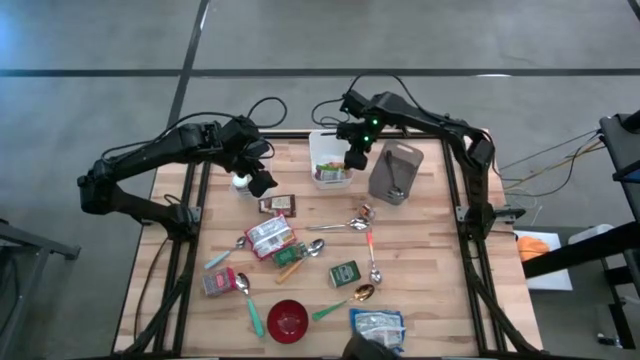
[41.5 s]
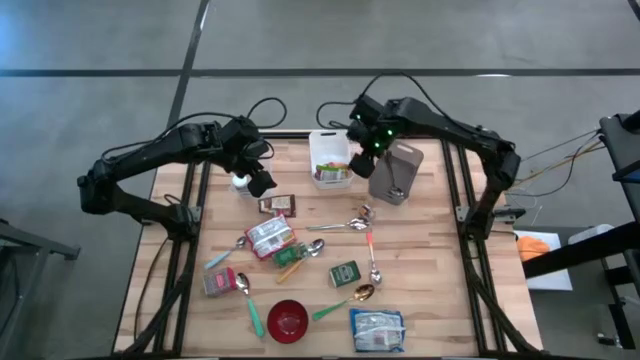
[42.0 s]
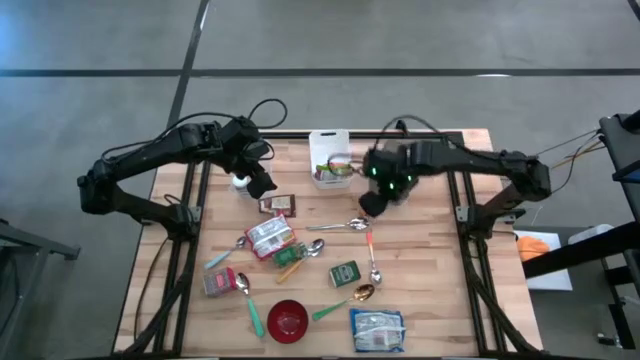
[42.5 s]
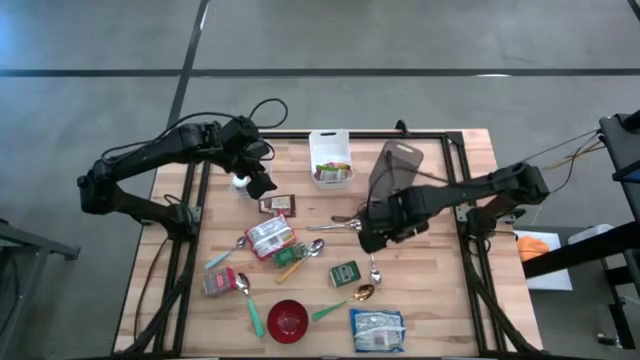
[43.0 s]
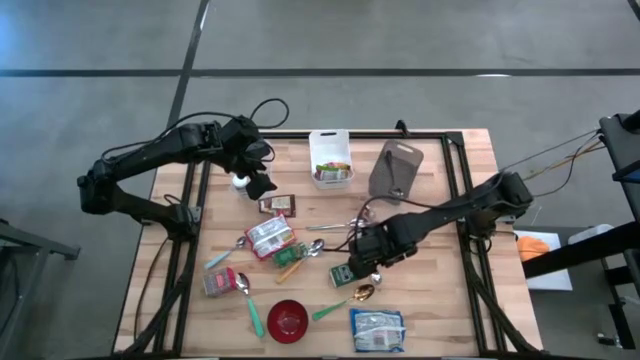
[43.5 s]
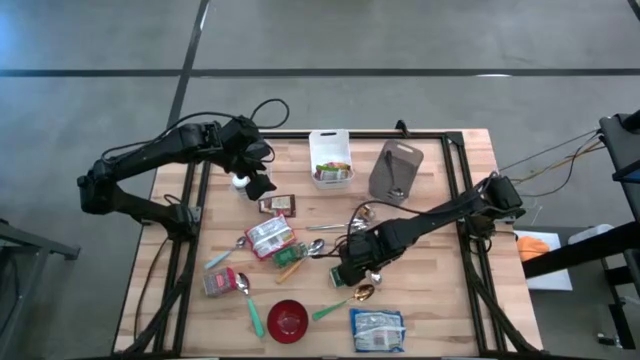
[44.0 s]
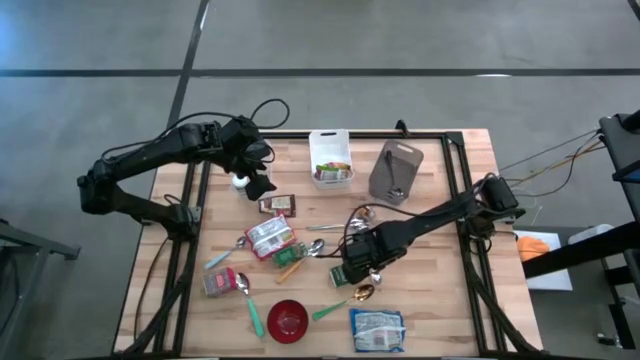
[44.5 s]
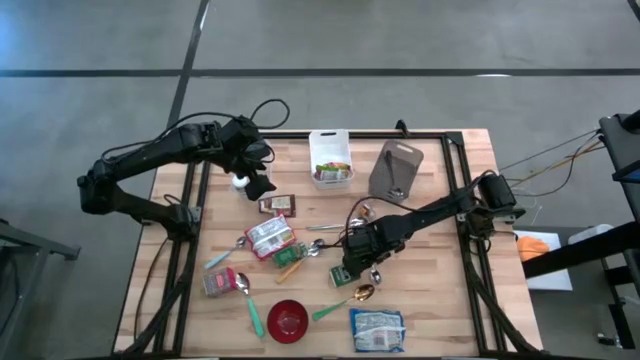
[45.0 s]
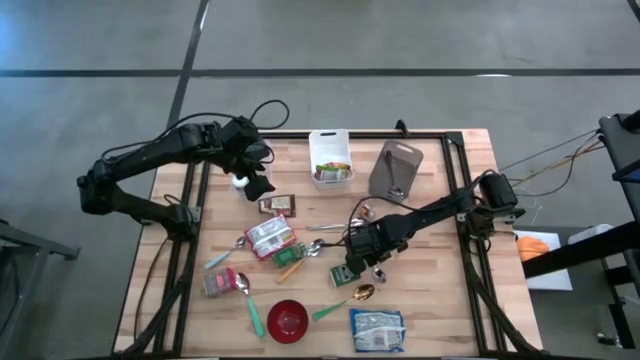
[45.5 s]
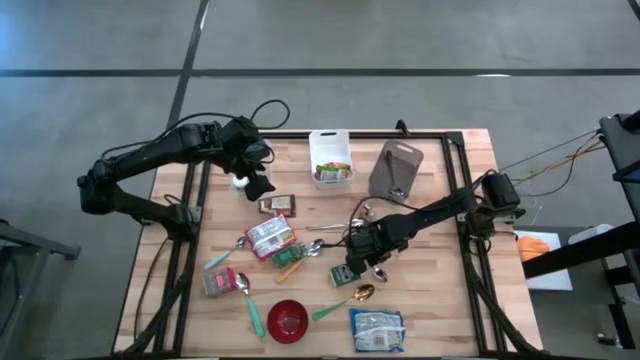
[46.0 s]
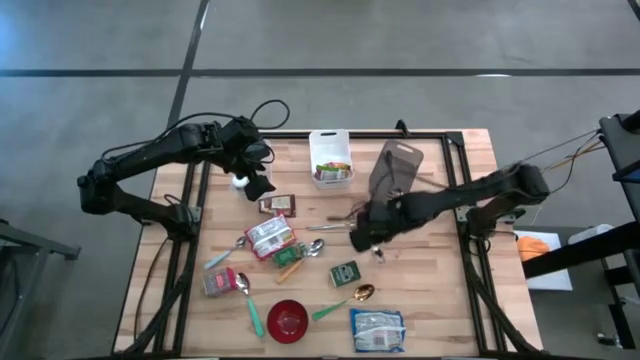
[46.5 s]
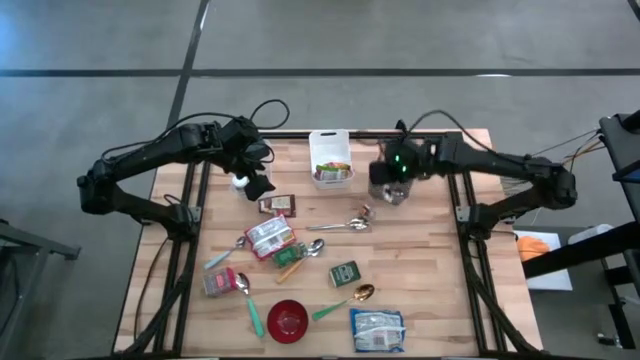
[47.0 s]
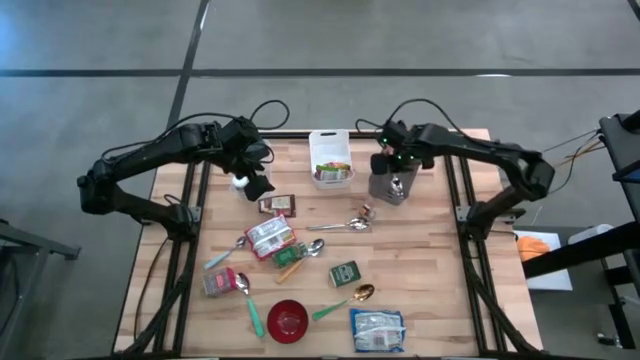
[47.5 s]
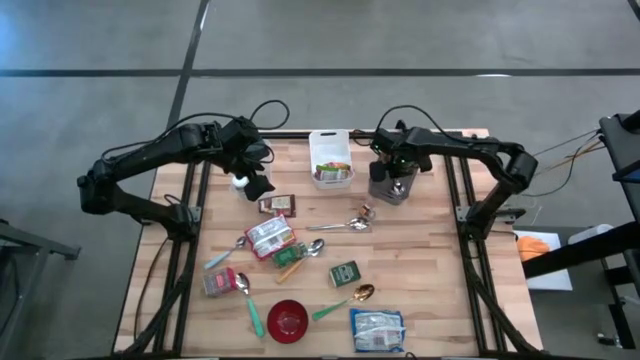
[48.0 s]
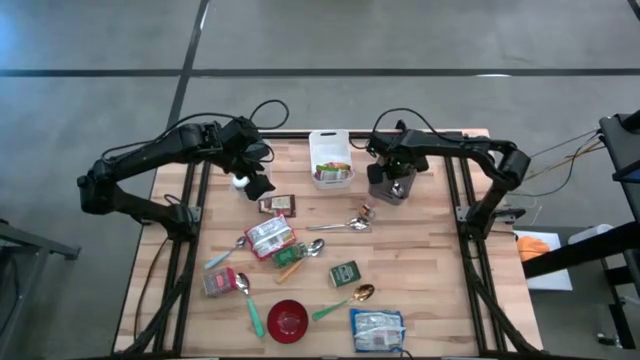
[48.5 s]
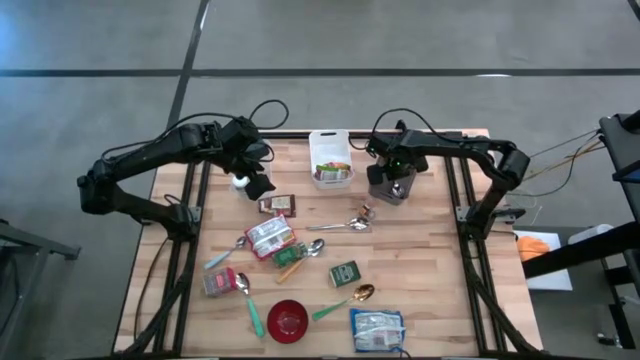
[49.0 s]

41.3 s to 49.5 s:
Put the orange spoon into the black bin

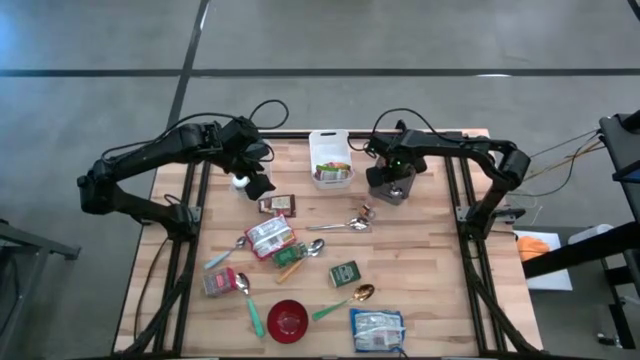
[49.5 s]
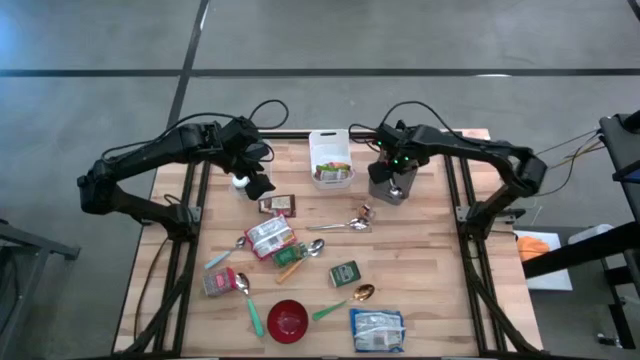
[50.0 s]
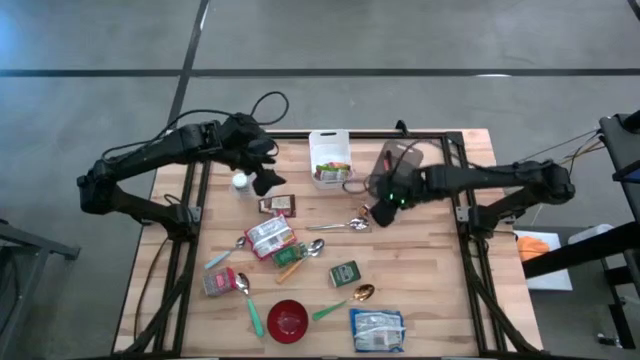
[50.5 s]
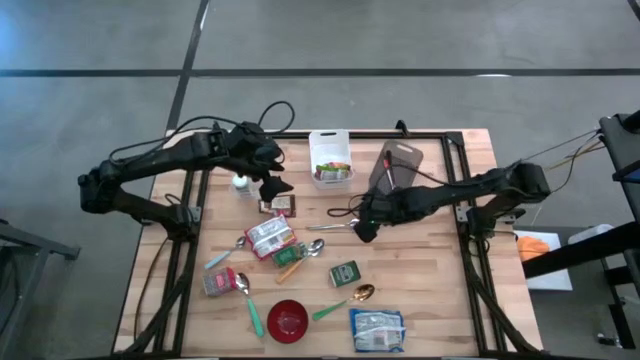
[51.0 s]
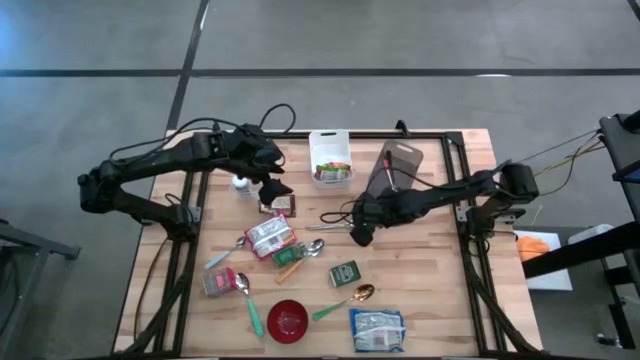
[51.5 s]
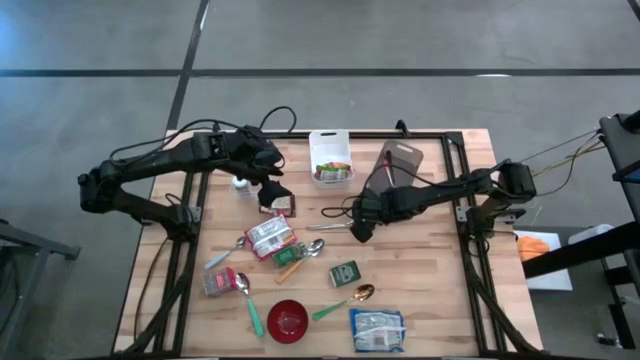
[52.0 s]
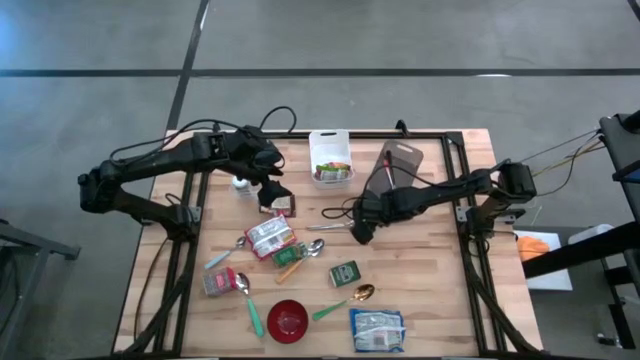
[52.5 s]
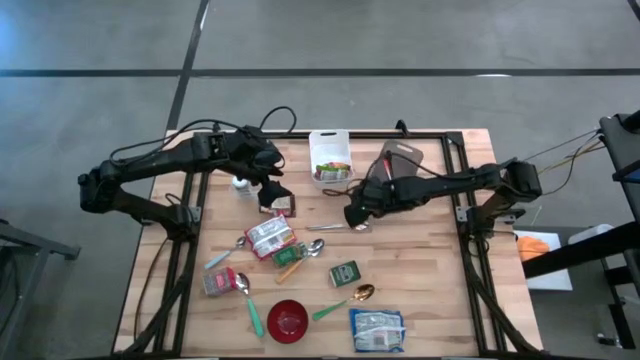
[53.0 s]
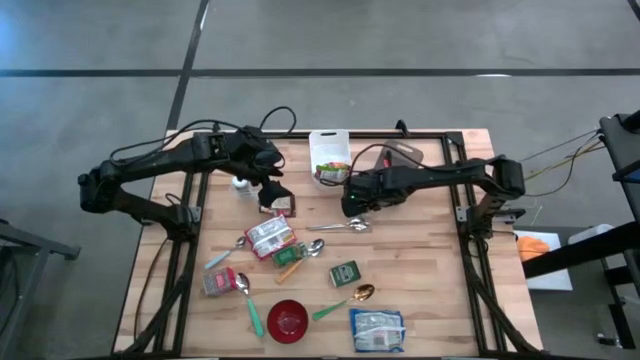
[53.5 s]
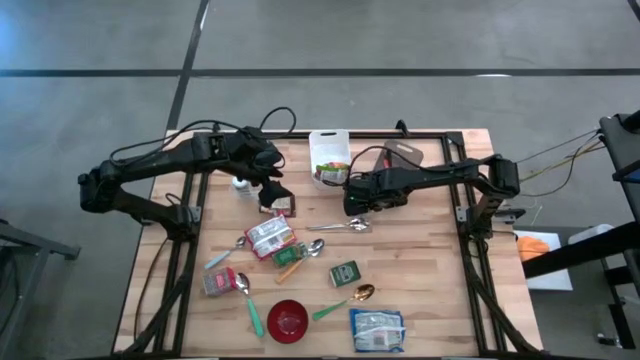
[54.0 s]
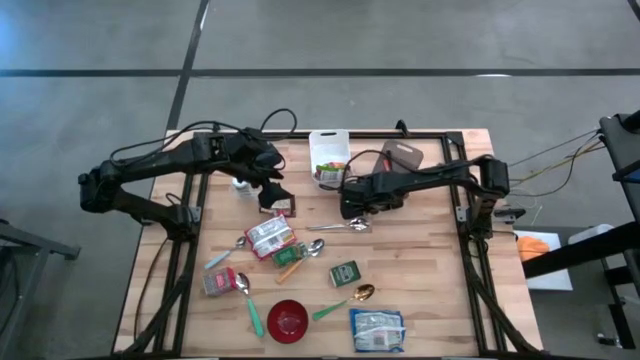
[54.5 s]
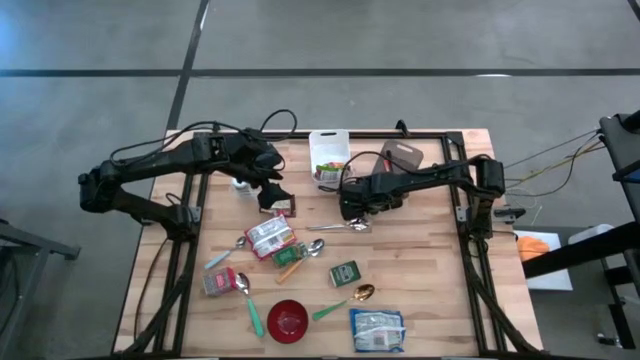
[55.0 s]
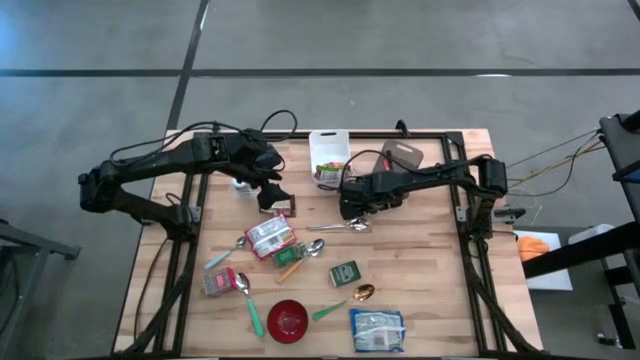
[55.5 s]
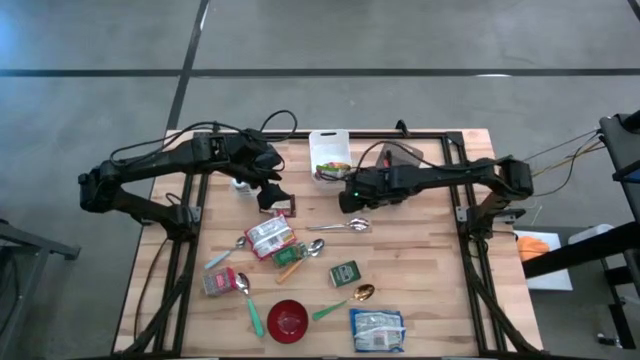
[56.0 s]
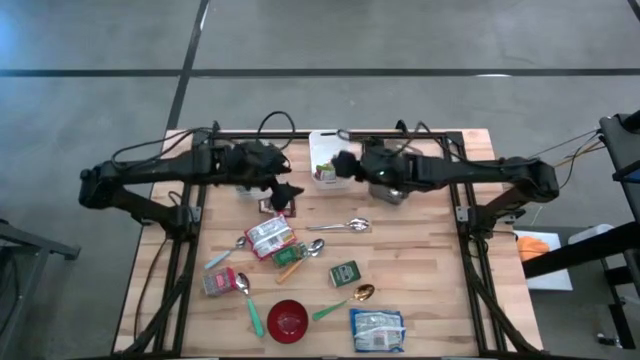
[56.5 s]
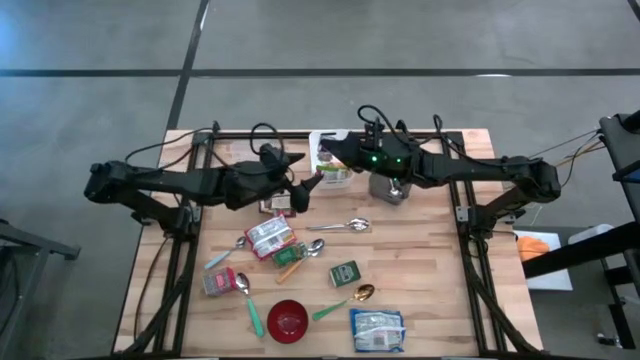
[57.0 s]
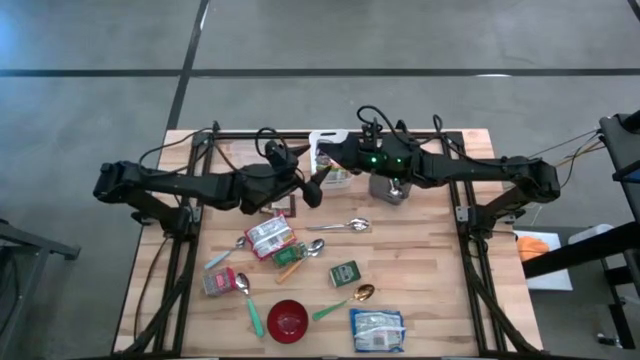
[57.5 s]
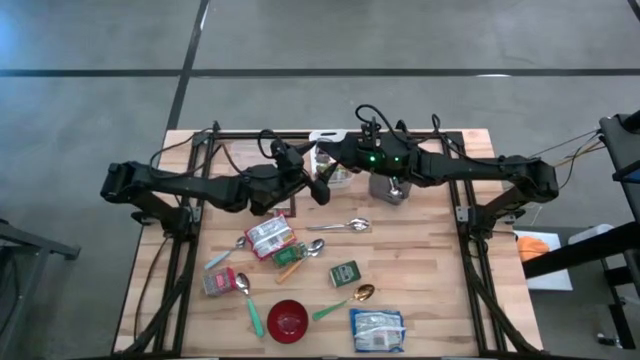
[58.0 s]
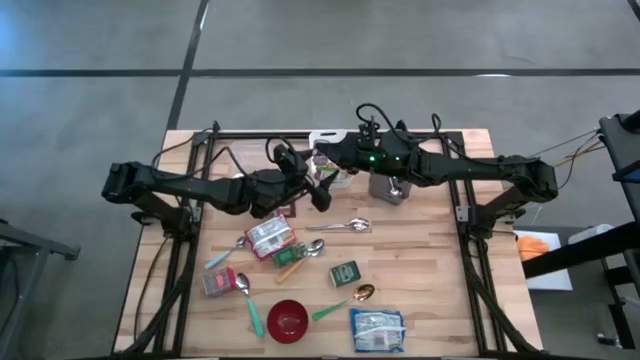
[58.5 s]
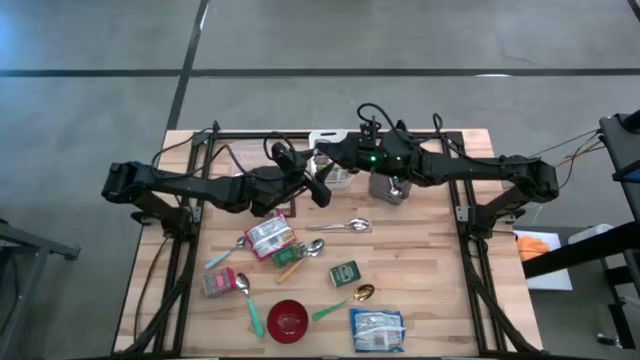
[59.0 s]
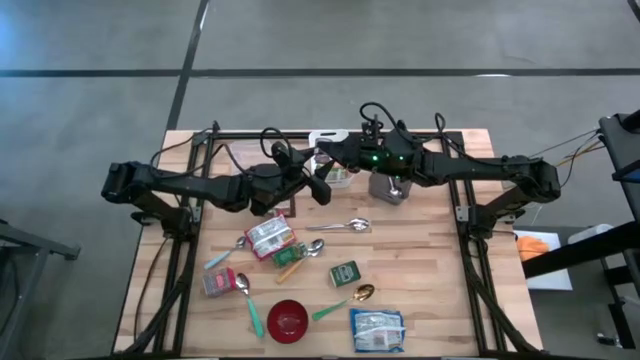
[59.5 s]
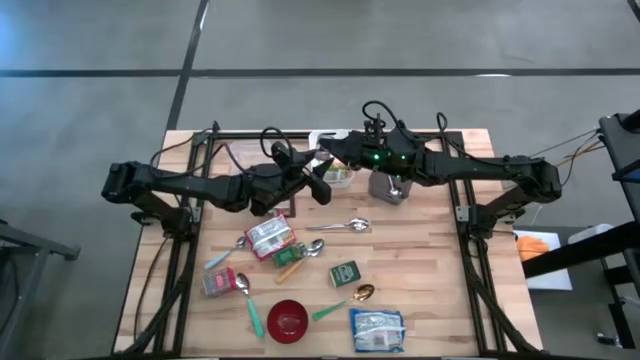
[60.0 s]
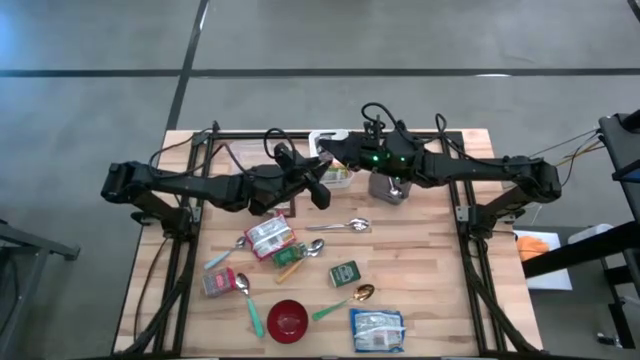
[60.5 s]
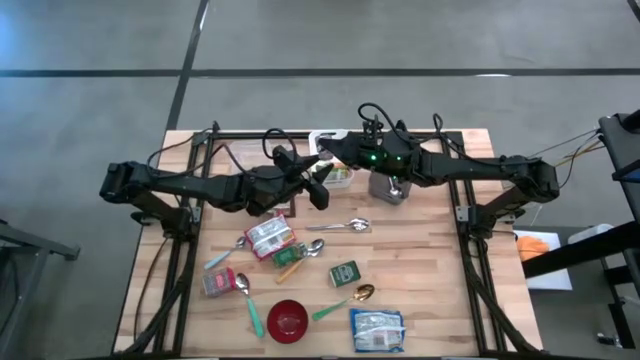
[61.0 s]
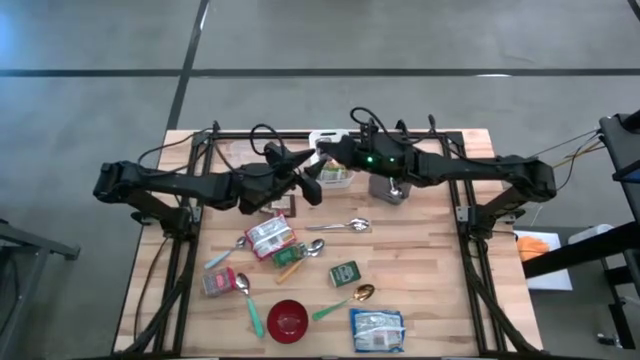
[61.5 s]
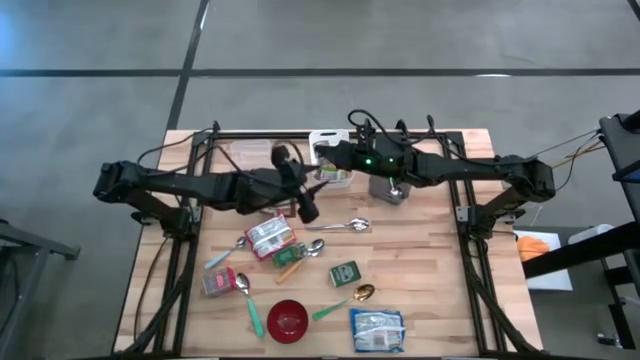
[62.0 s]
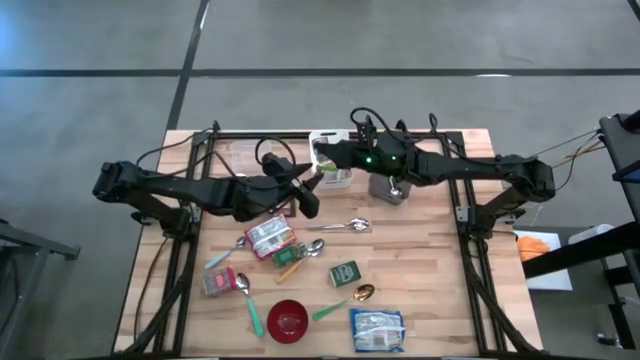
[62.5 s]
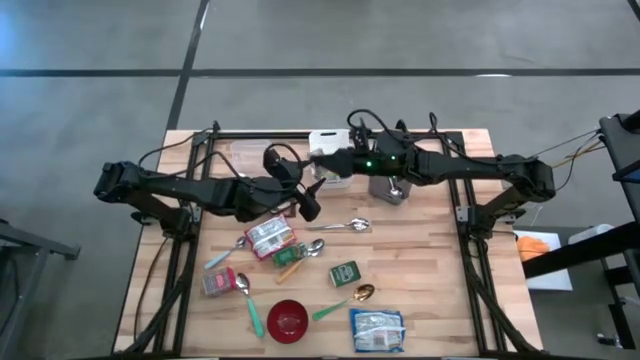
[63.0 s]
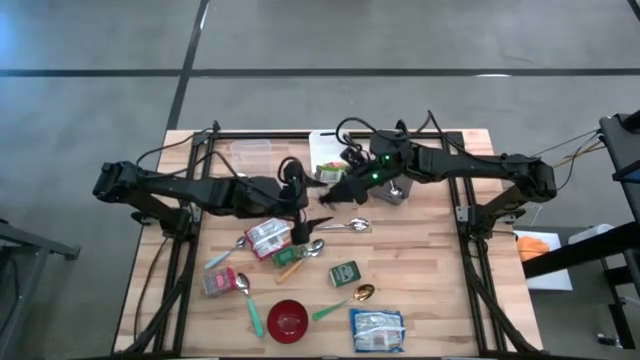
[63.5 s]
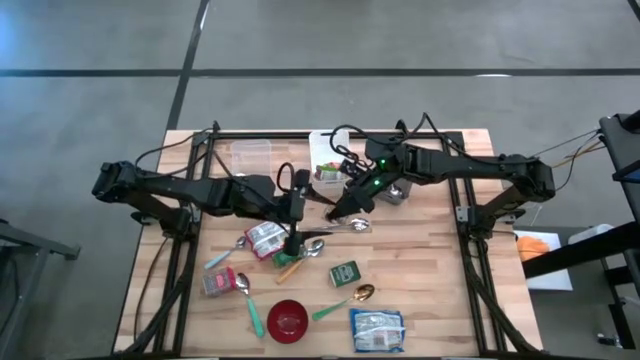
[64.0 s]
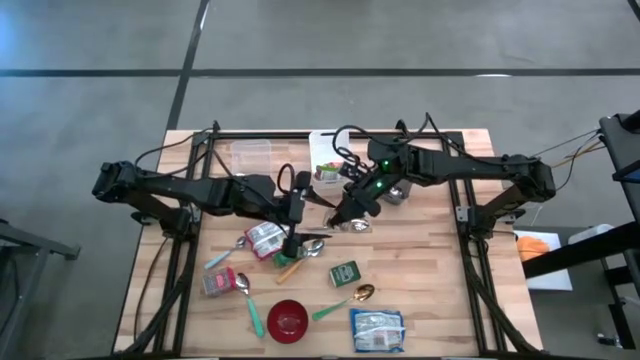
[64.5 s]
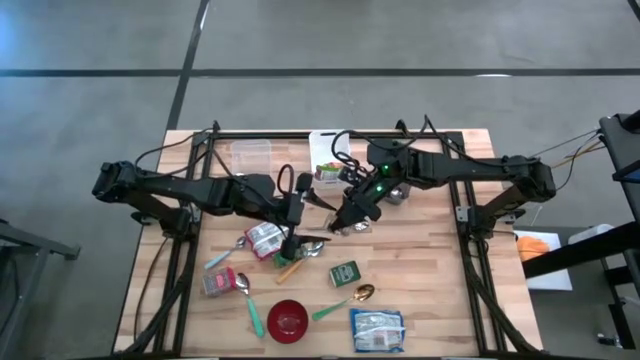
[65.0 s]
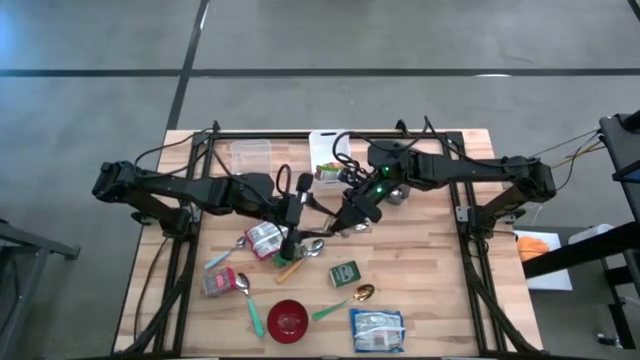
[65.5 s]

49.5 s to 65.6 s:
Put the brown seasoning bottle into the transparent bin
